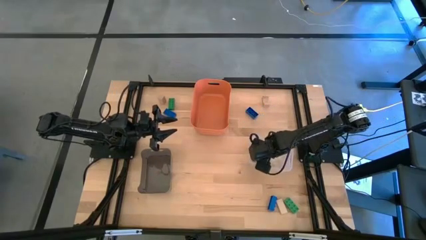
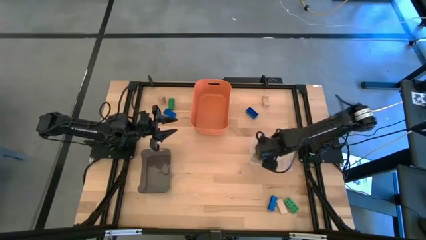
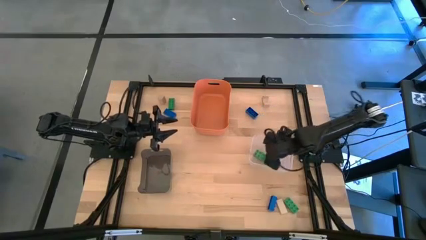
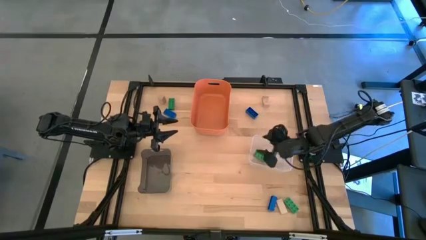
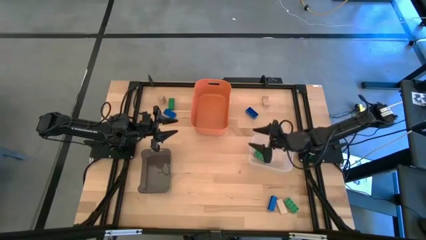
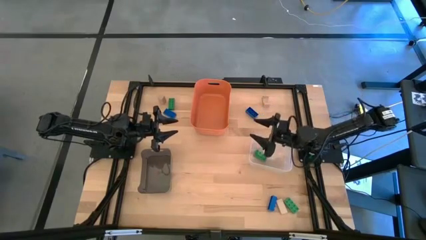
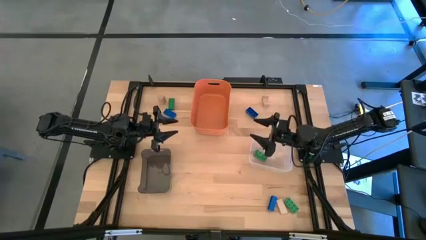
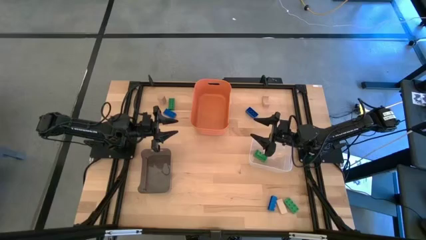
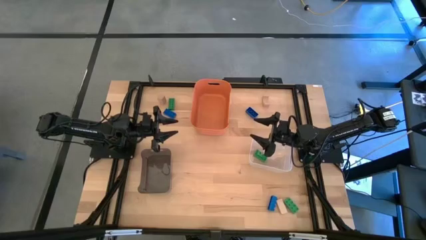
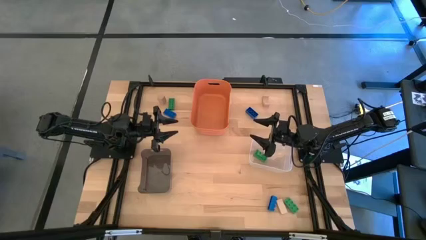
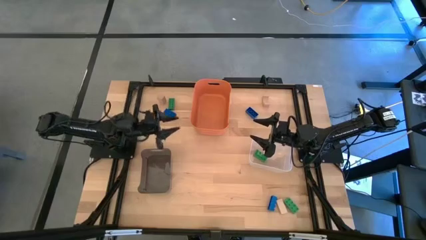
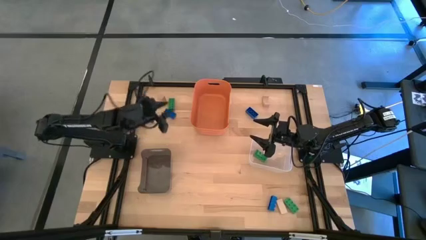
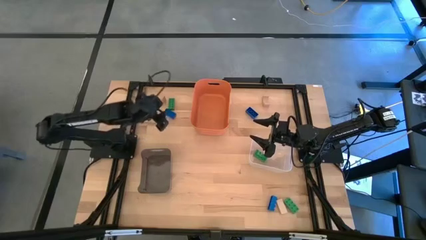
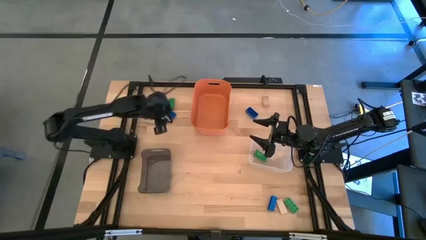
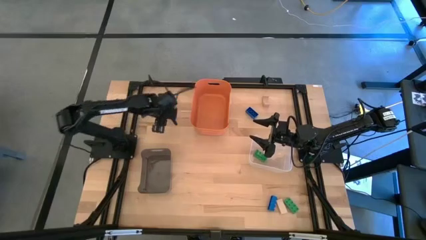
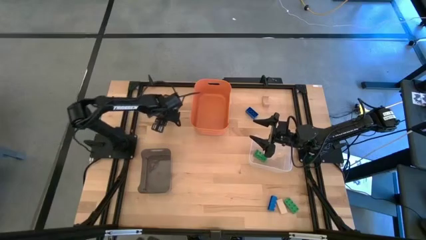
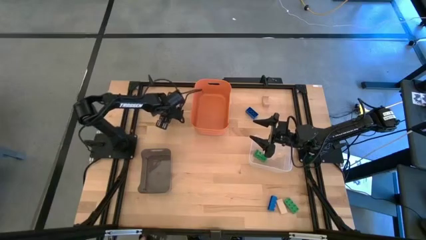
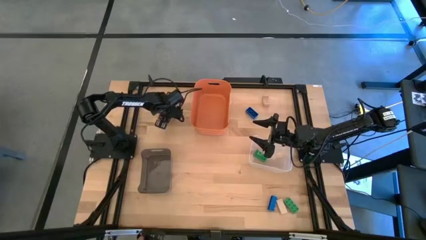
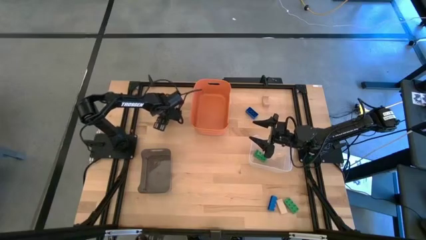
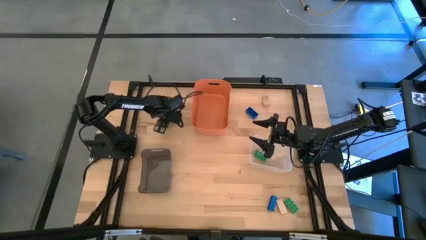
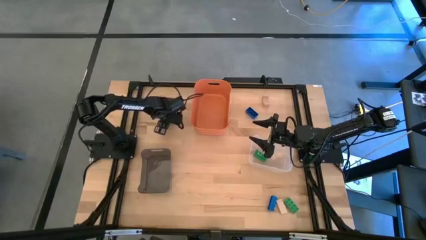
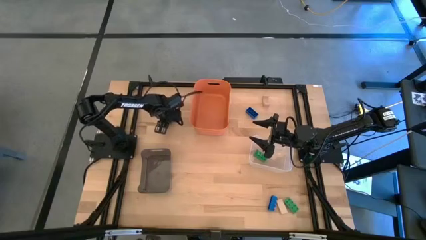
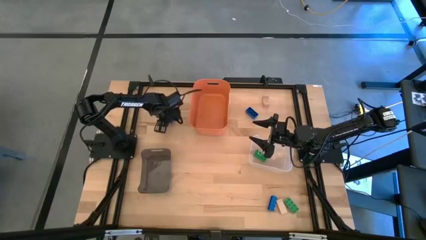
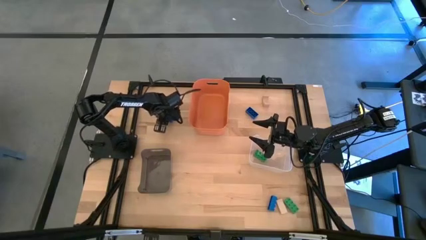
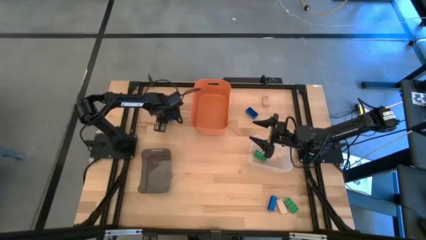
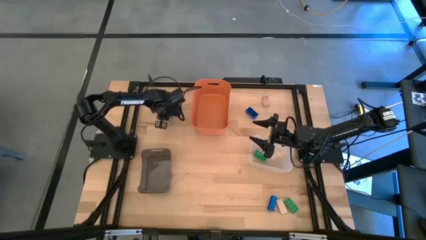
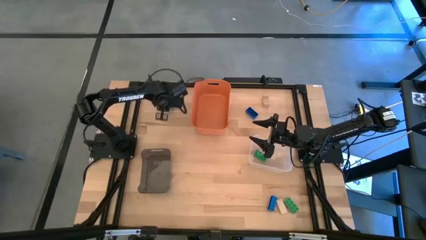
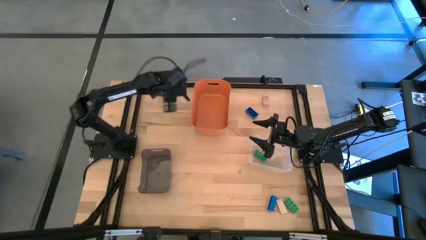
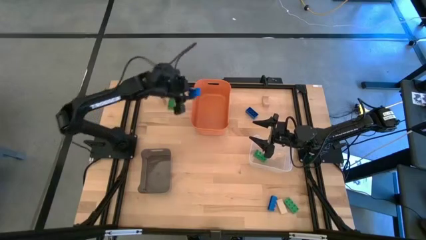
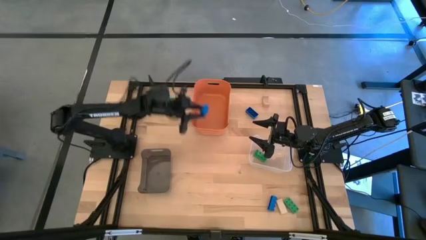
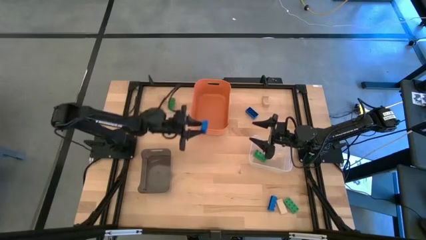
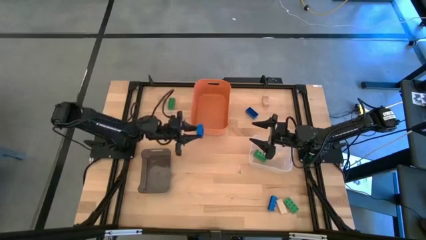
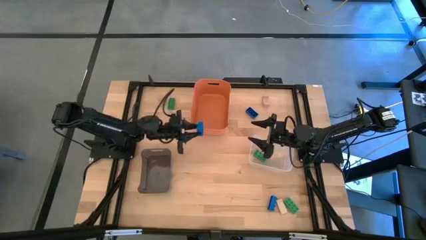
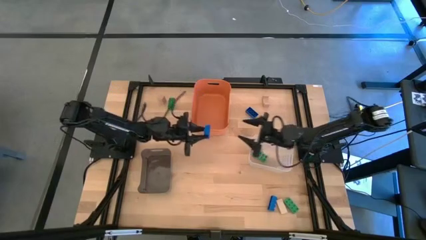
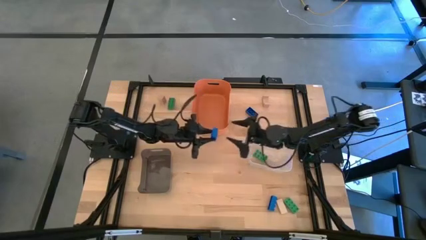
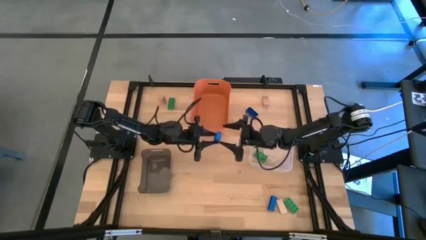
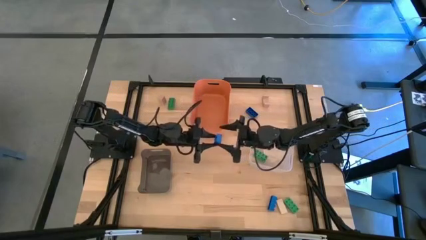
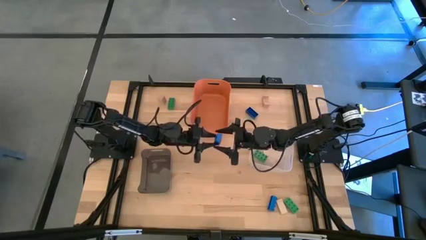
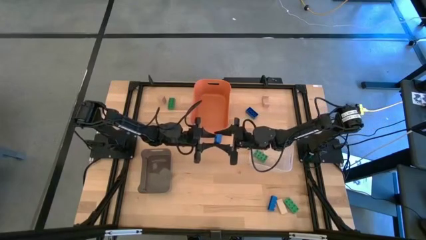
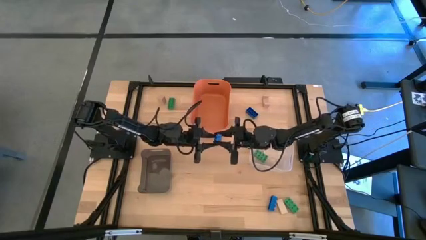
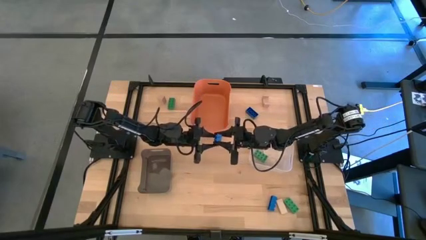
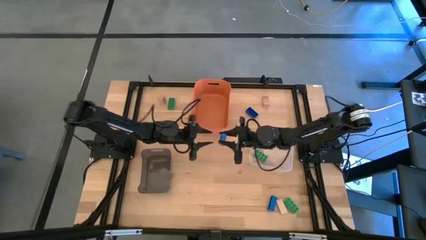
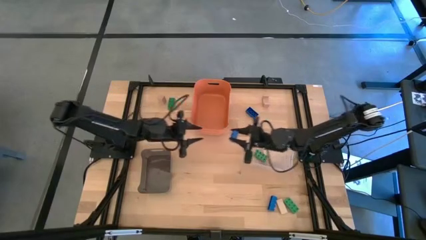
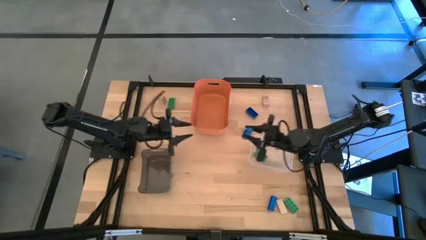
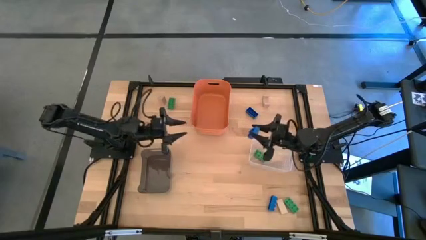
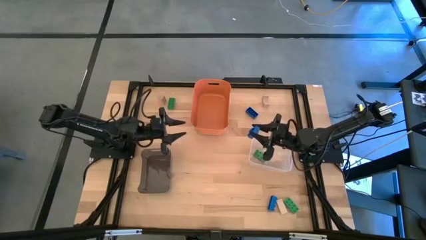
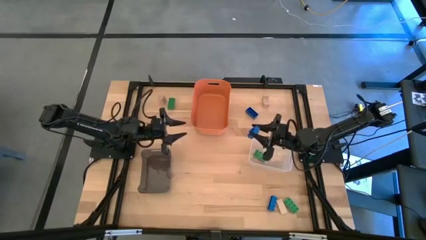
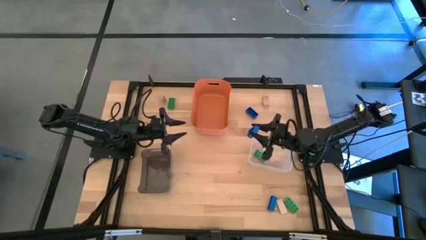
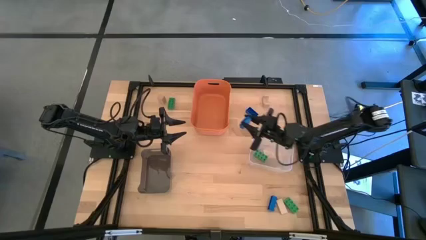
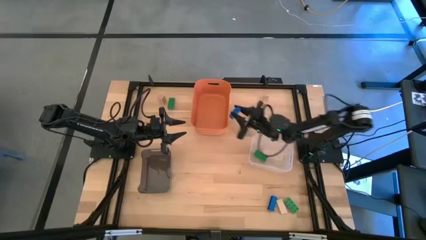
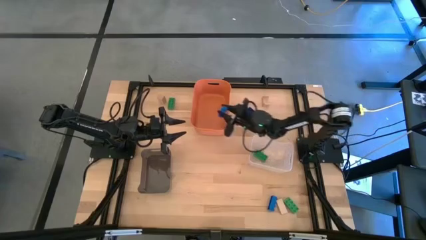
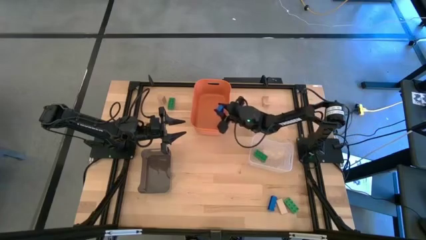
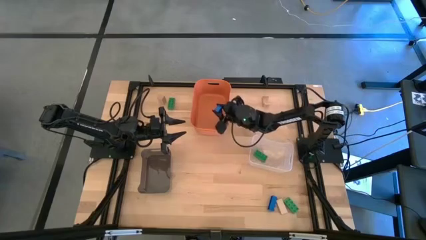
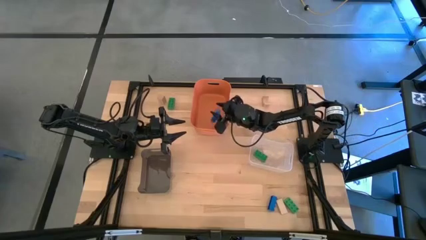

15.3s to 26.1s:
Task: Sort & place blocks by color
Put the top left blue game piece into the orange bin

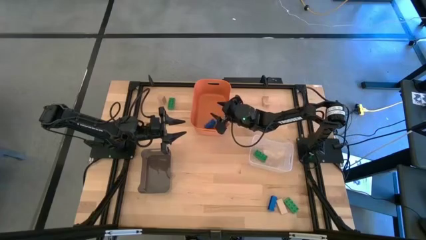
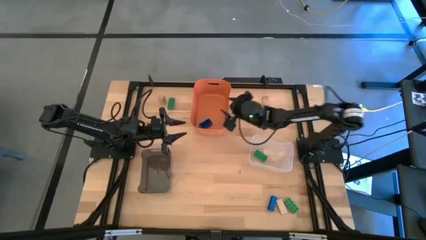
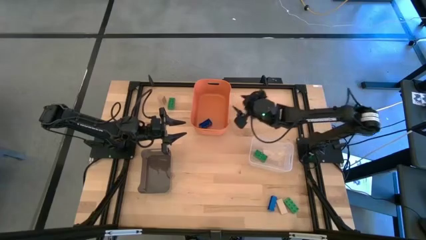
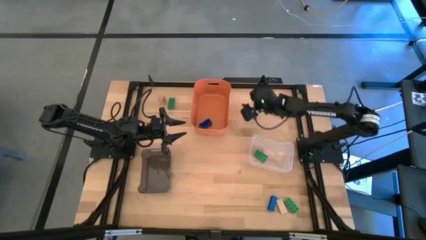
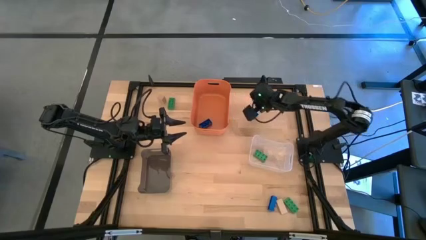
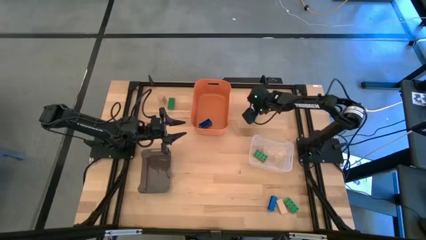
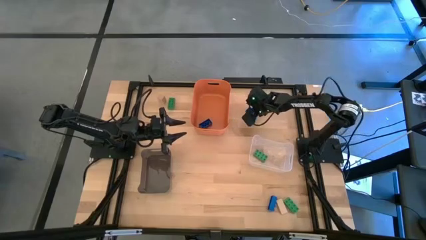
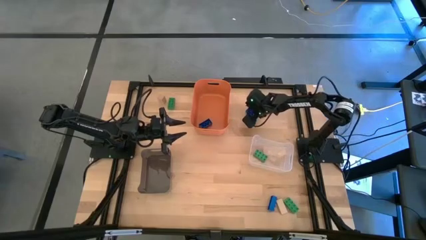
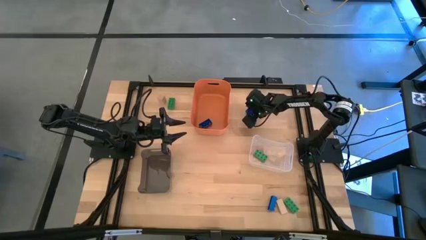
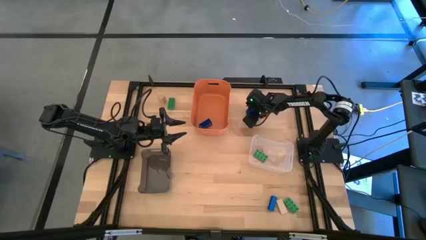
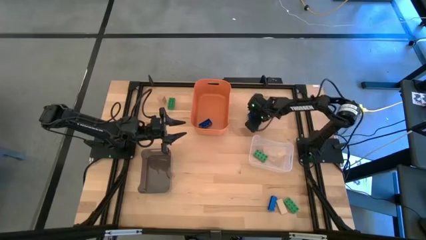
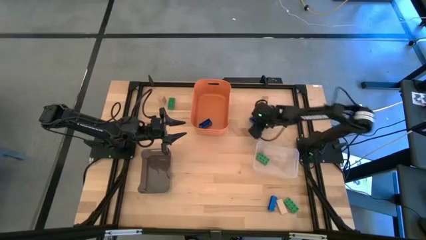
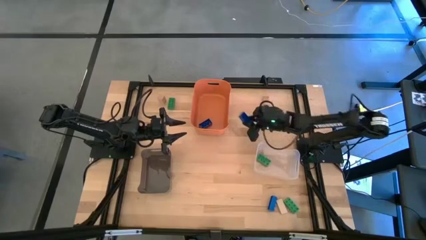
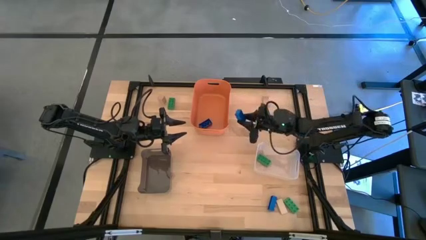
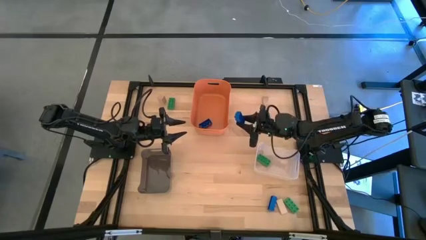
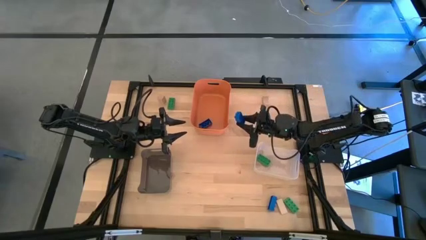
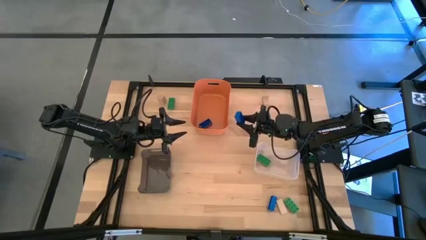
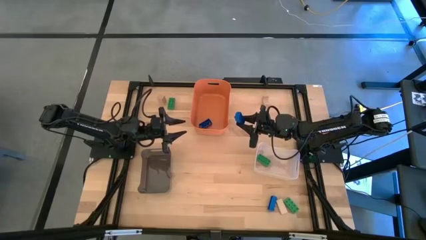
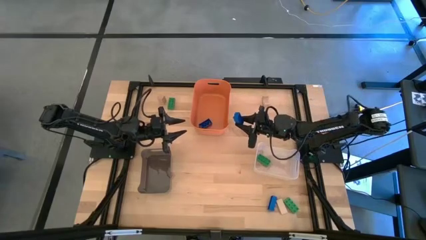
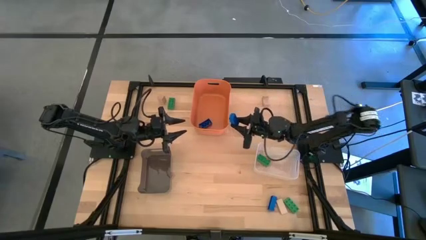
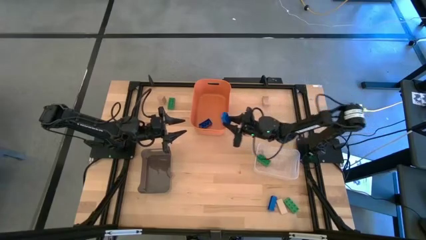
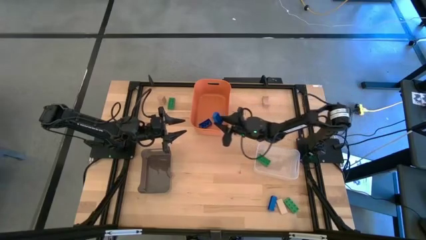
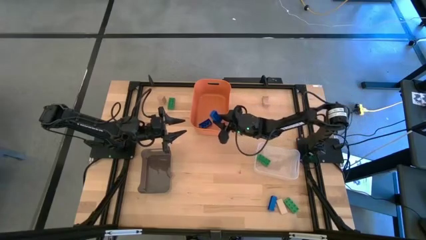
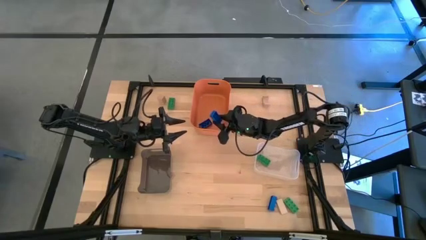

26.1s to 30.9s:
Put the top blue game piece into the orange bin
